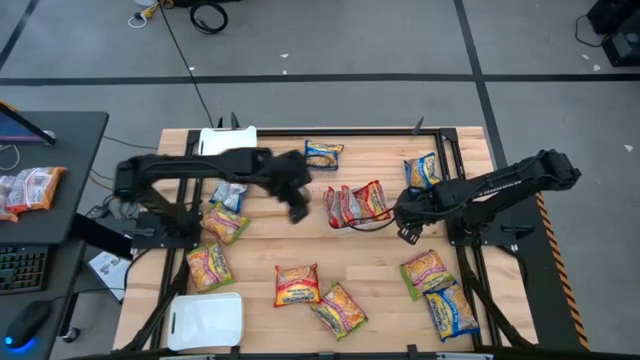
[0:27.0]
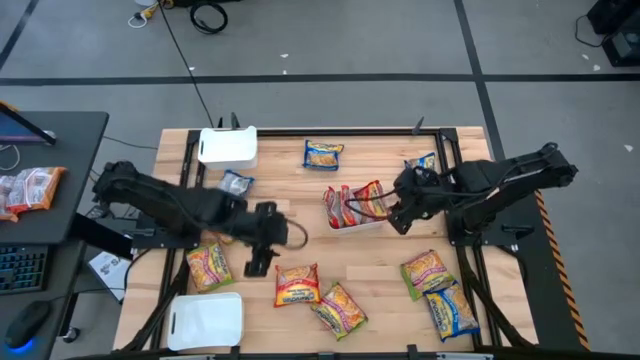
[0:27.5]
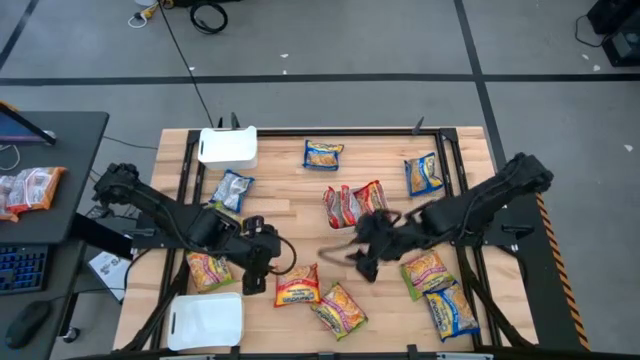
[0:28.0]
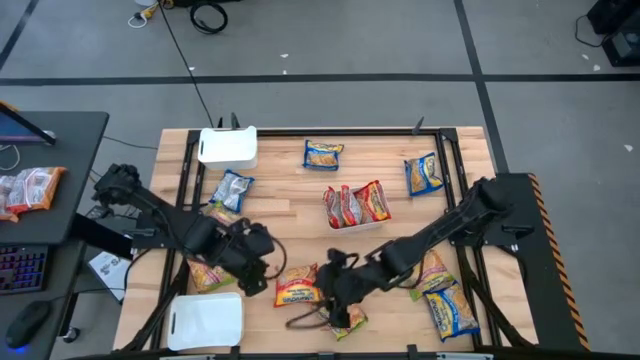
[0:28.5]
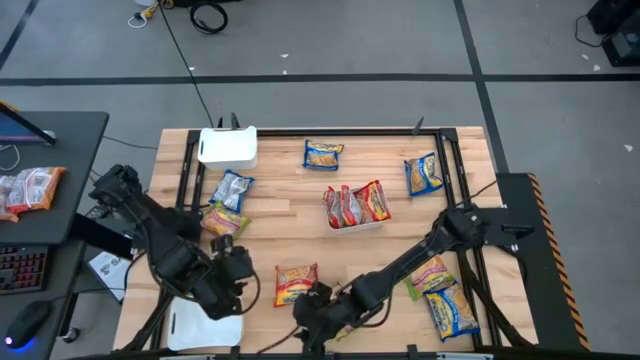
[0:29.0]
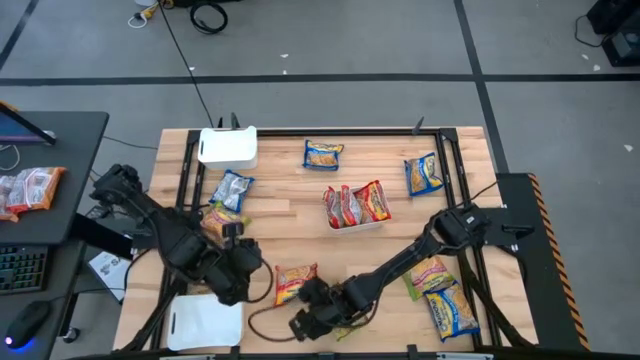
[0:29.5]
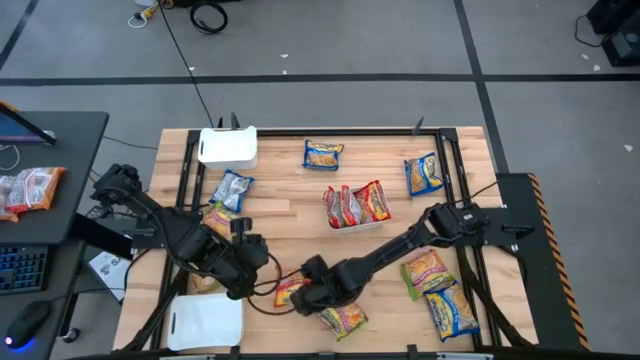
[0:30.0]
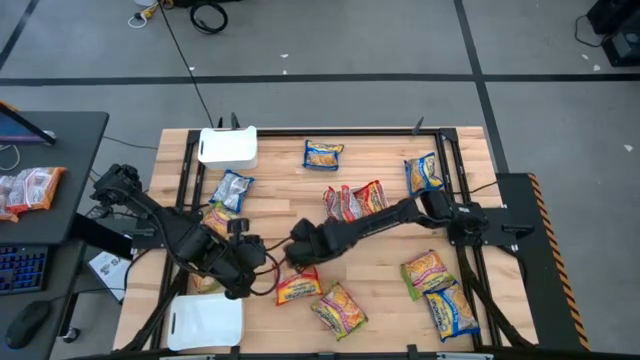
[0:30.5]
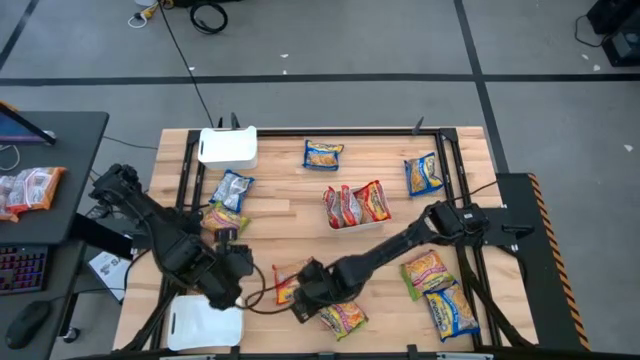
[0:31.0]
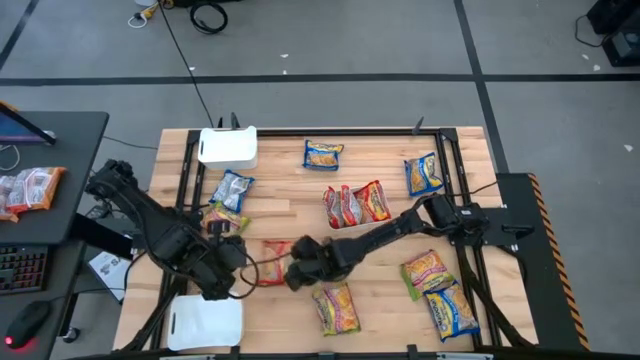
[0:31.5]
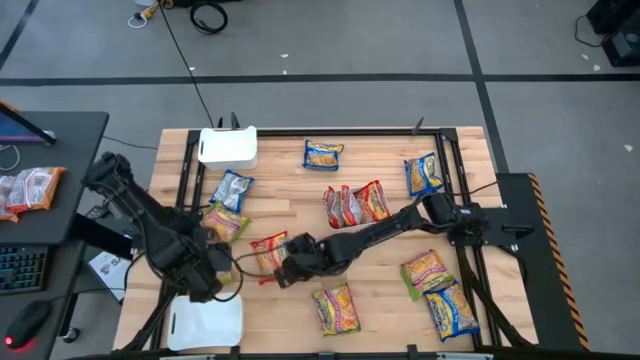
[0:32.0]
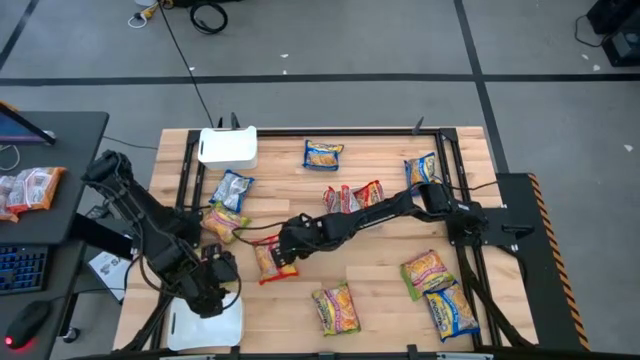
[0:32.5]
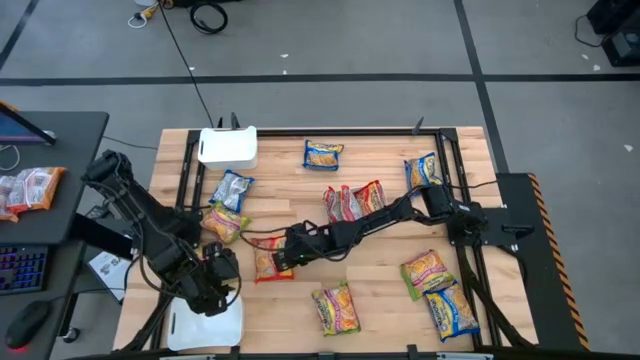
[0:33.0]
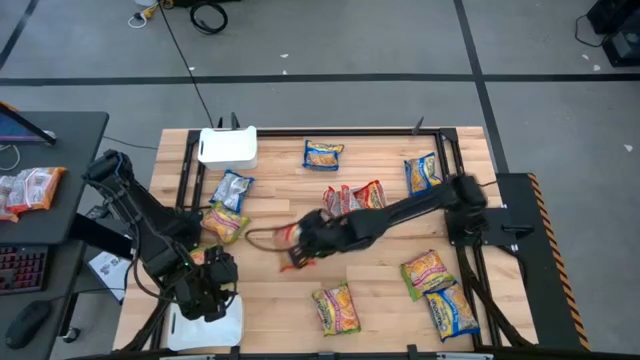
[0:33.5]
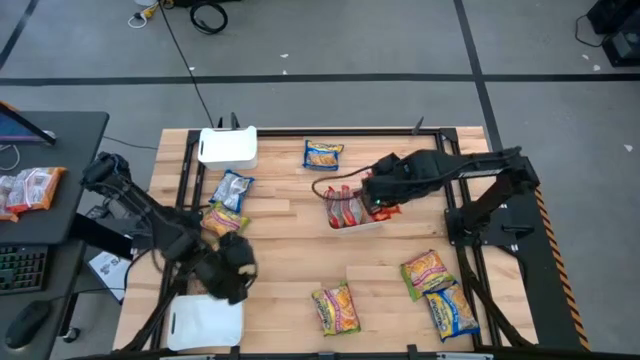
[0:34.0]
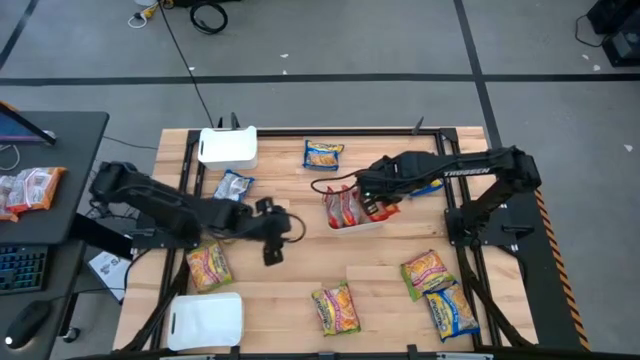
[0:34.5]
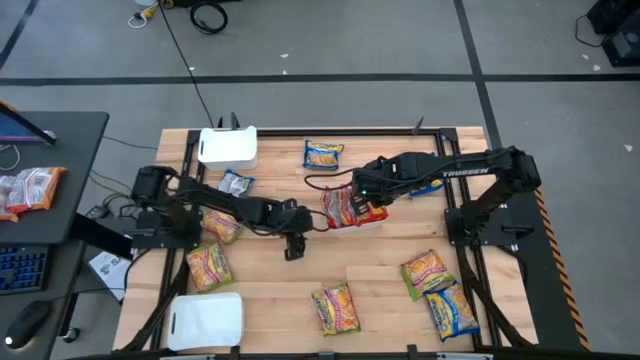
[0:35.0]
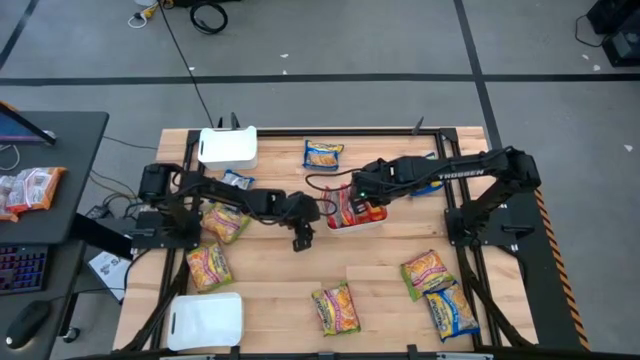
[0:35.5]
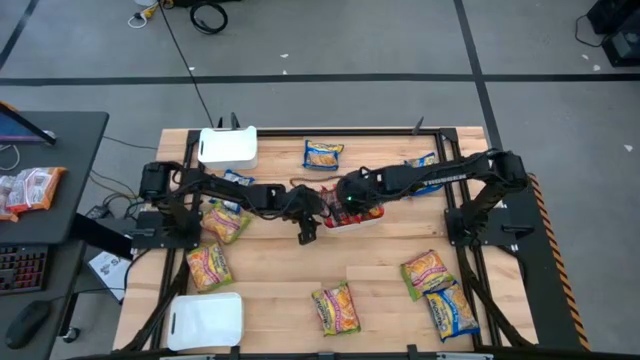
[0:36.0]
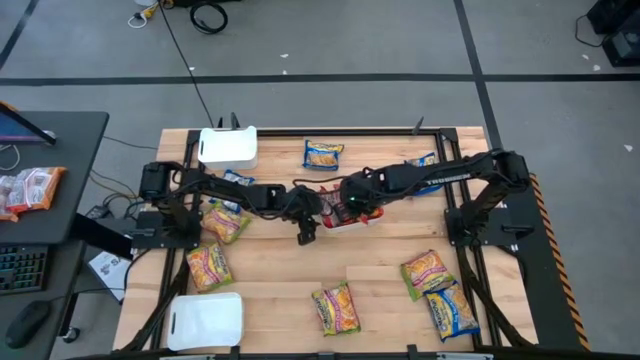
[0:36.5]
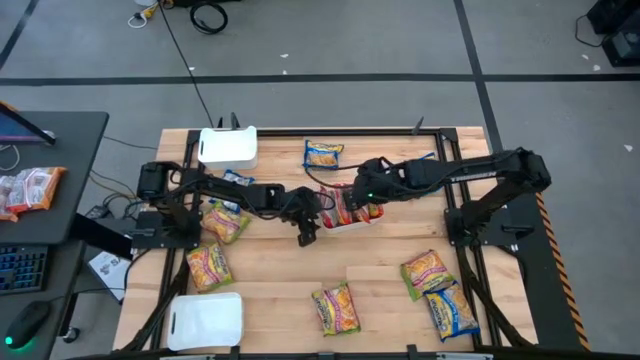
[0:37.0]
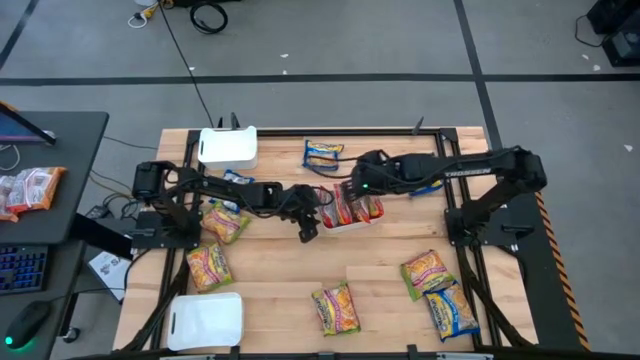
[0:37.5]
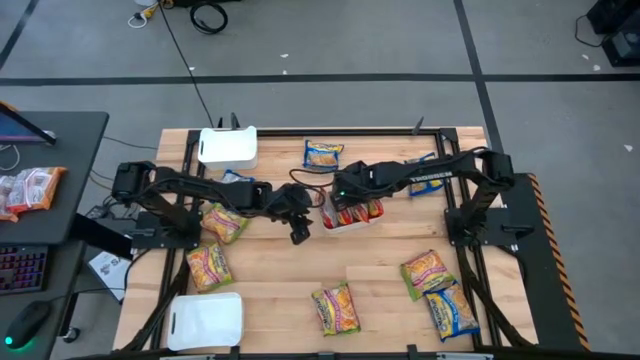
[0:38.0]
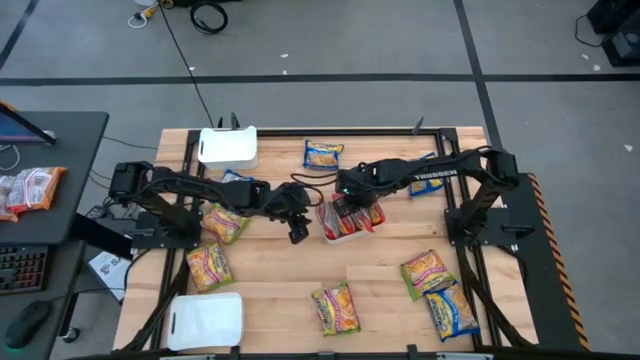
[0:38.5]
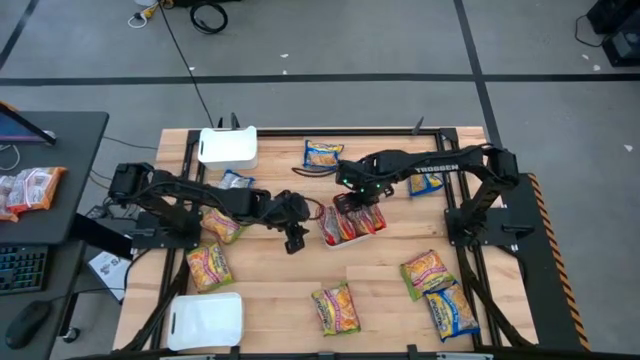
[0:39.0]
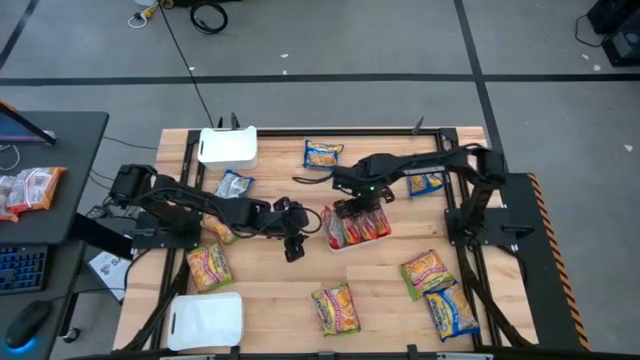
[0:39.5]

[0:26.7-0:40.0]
Task: Sort Maruchan noodles
Put the orange noodle pack into the middle white bin

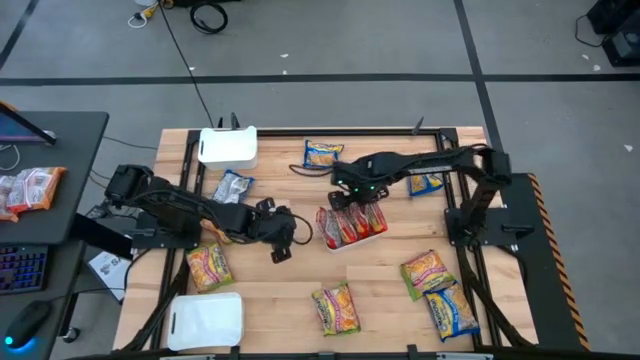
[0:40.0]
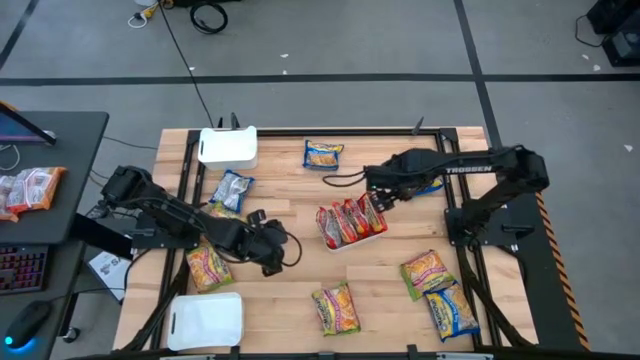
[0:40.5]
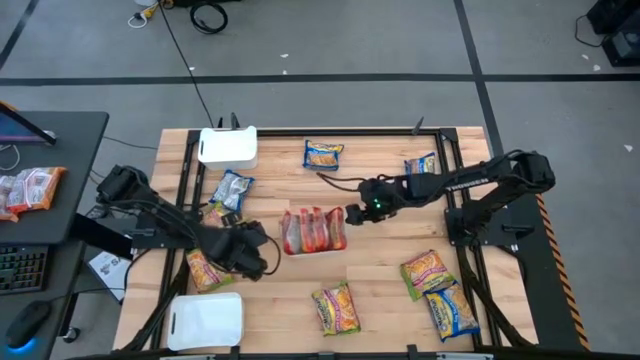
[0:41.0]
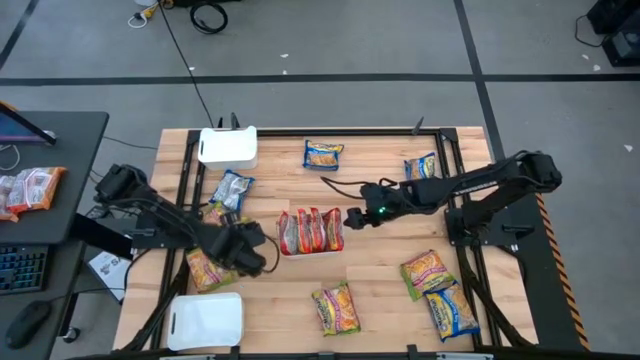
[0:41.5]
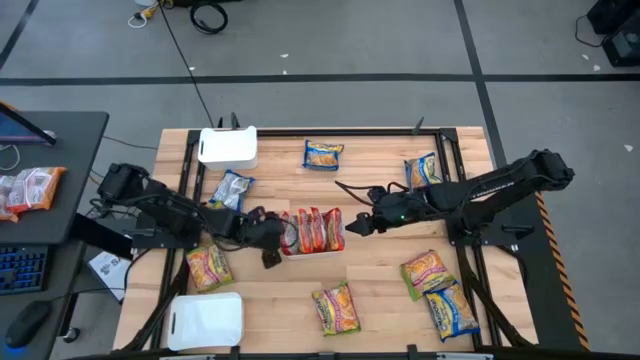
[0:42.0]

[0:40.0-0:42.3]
Adjust the white bin on the table

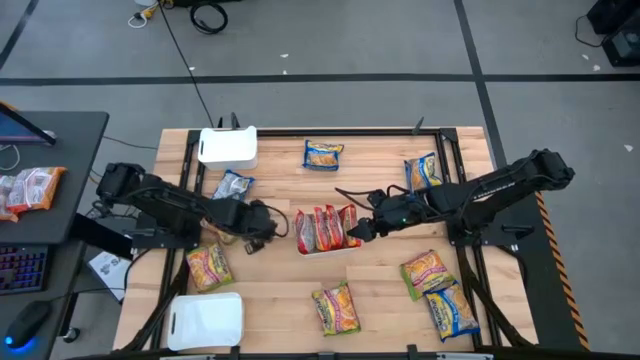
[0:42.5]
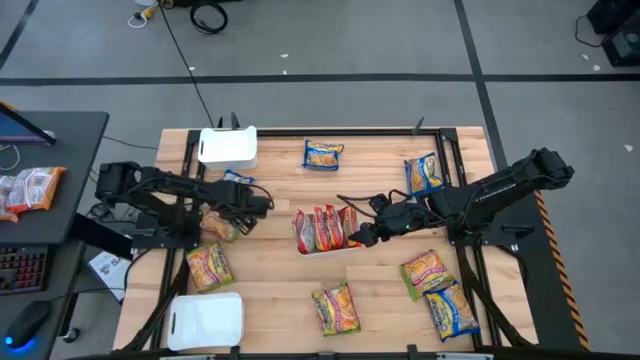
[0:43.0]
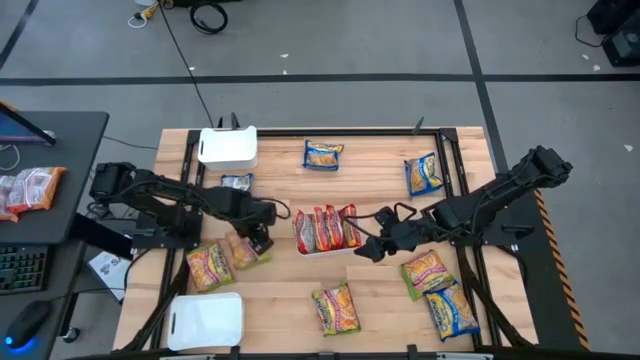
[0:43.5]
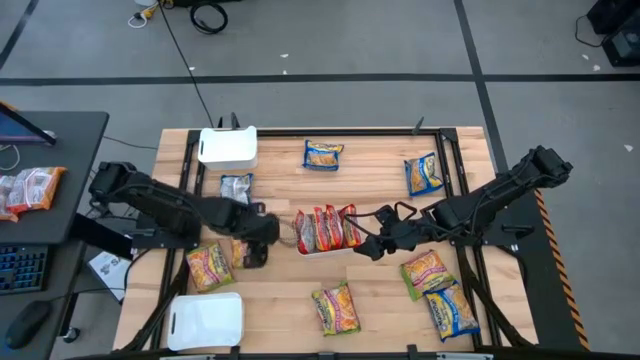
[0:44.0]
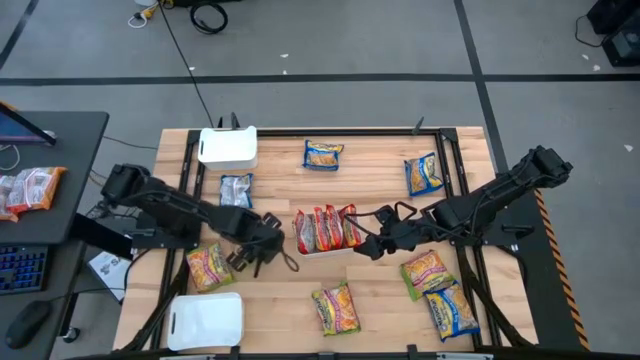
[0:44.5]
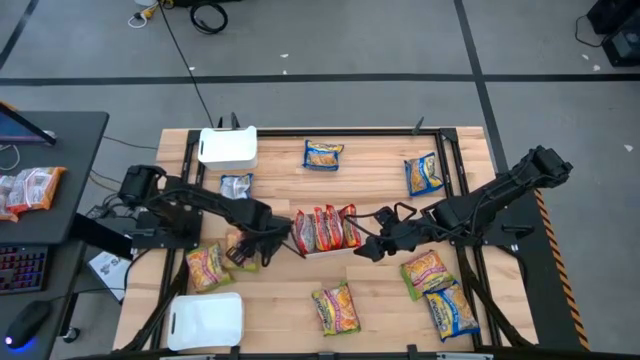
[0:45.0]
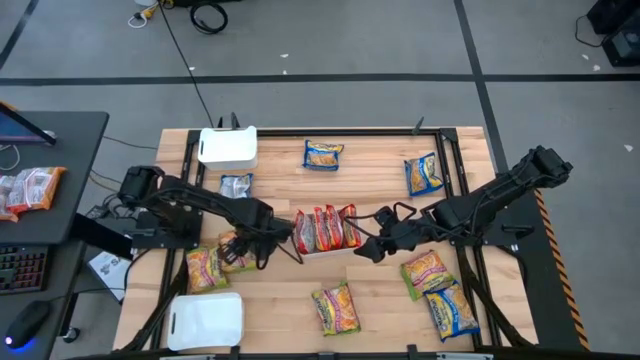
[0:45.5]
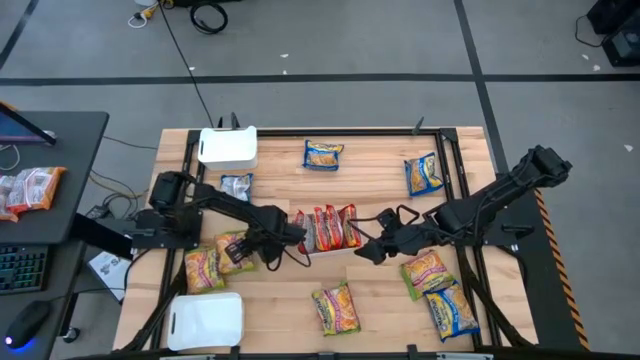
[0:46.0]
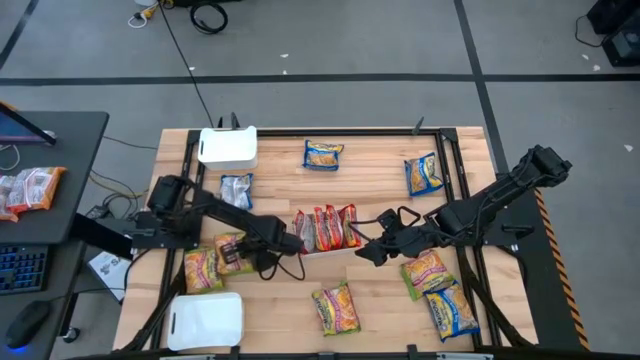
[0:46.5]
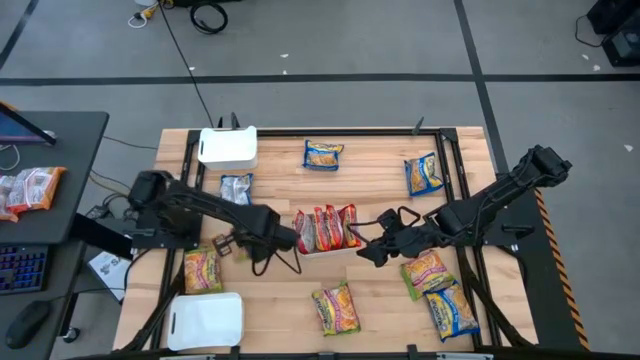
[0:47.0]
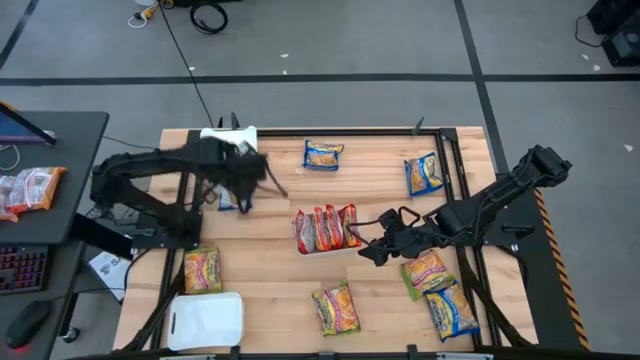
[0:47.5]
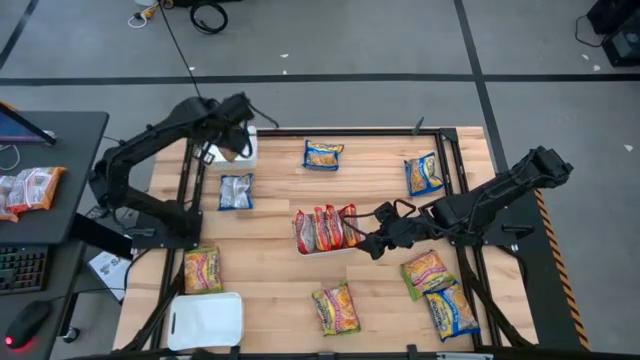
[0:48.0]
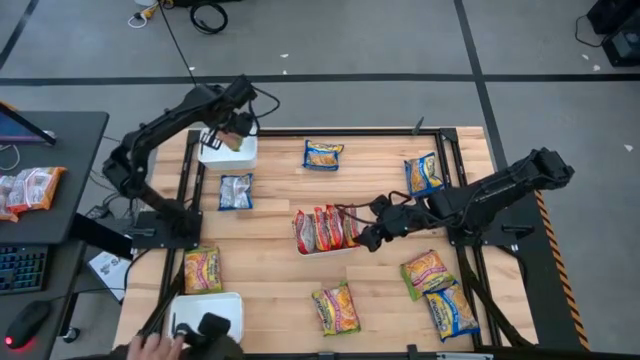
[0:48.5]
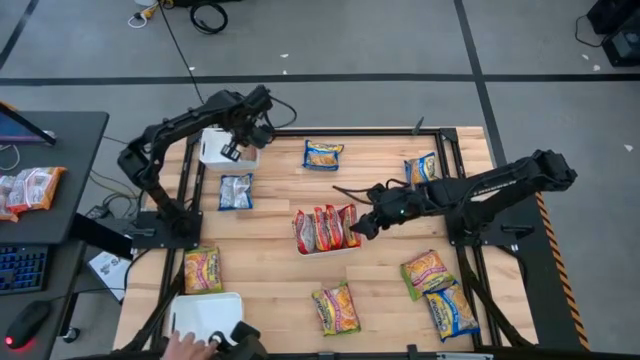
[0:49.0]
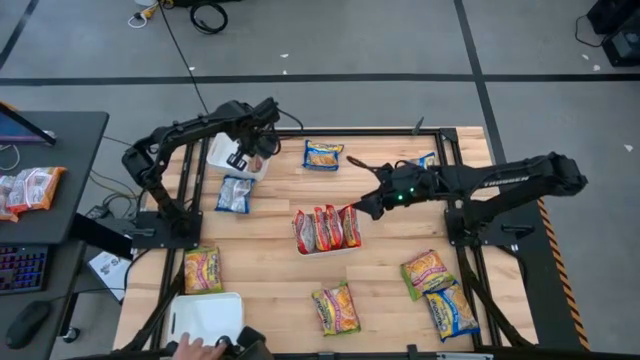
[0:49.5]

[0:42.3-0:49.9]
Put the green noodle pack into the top white bin
